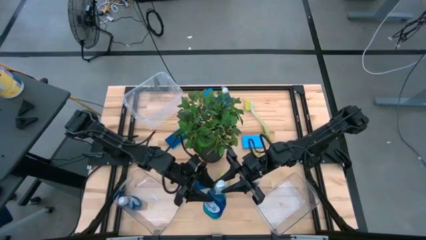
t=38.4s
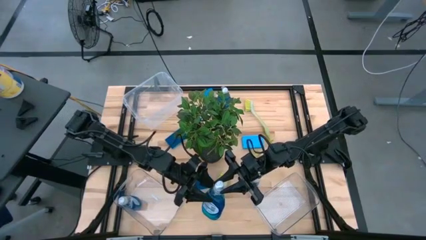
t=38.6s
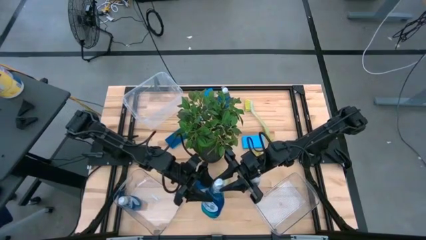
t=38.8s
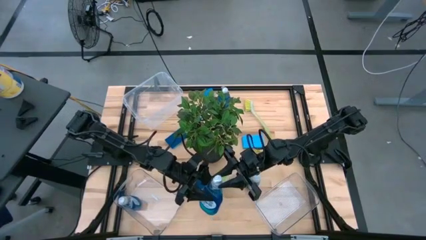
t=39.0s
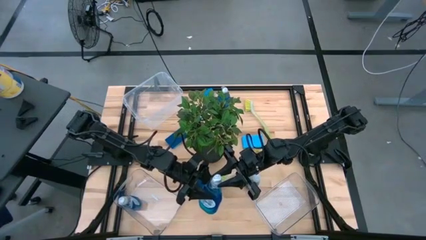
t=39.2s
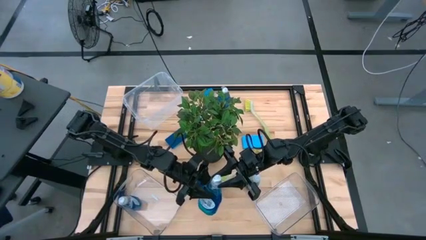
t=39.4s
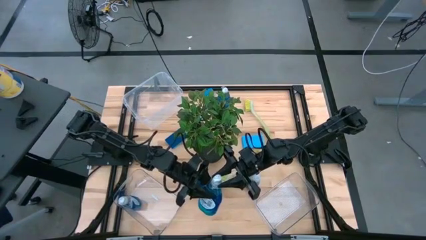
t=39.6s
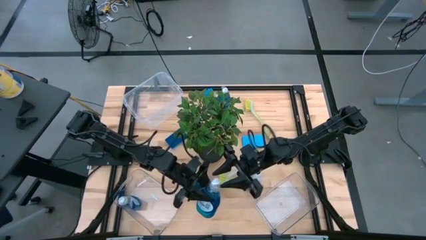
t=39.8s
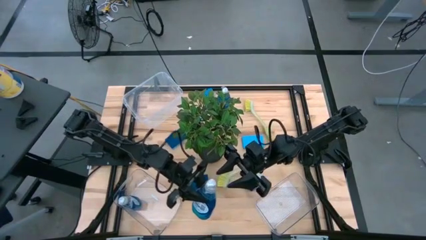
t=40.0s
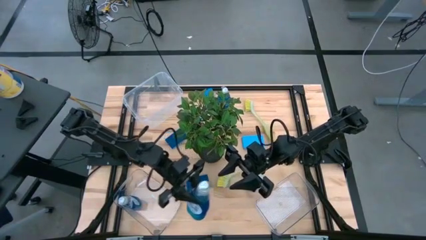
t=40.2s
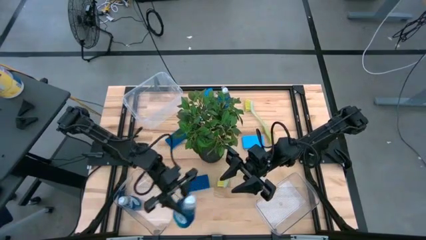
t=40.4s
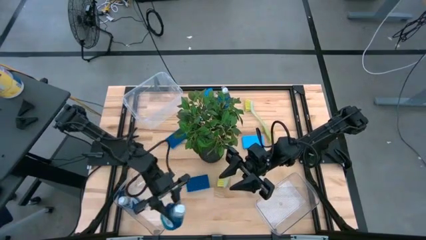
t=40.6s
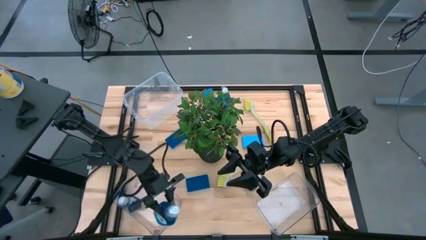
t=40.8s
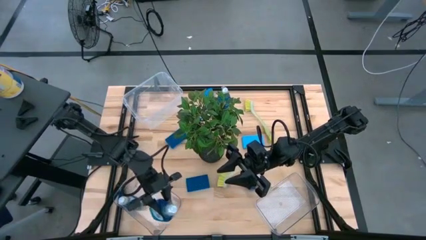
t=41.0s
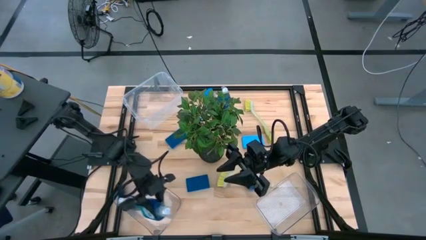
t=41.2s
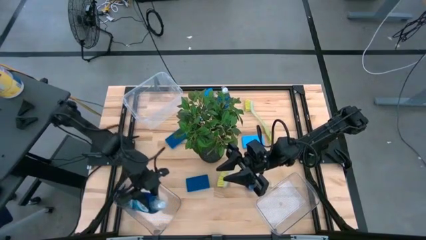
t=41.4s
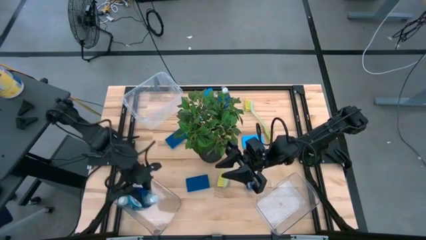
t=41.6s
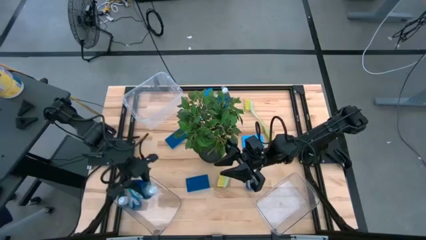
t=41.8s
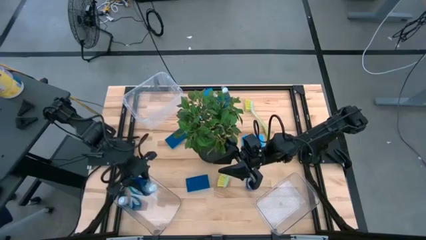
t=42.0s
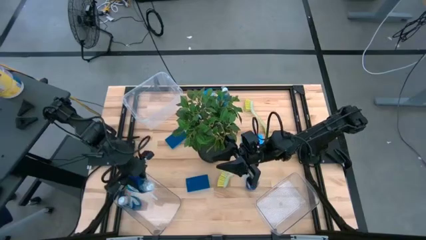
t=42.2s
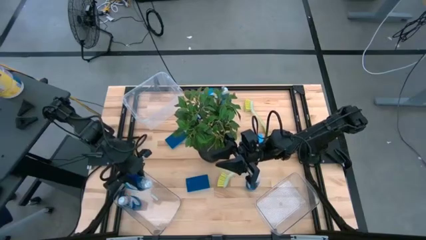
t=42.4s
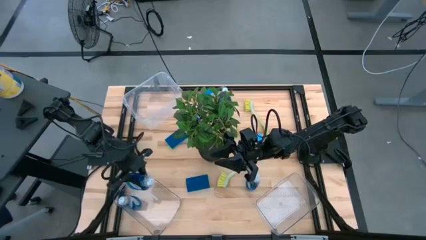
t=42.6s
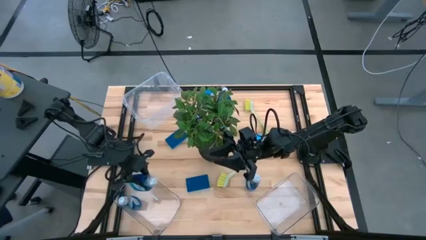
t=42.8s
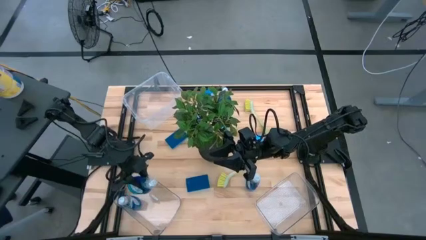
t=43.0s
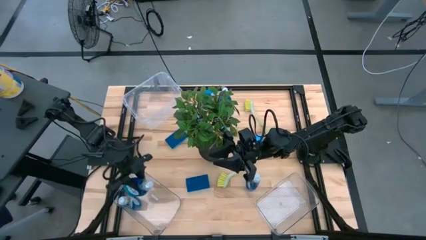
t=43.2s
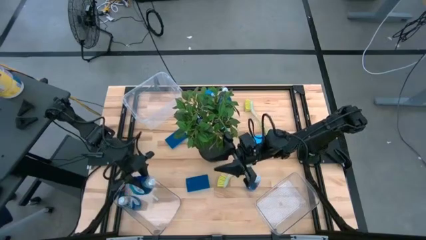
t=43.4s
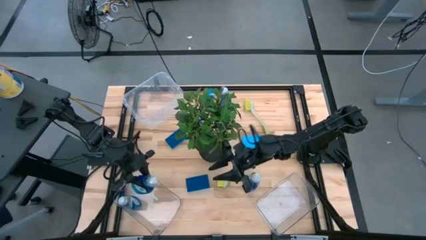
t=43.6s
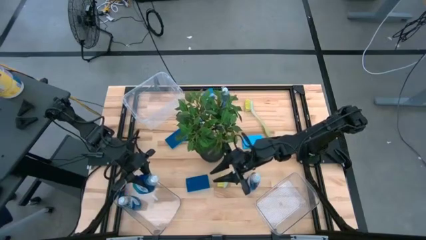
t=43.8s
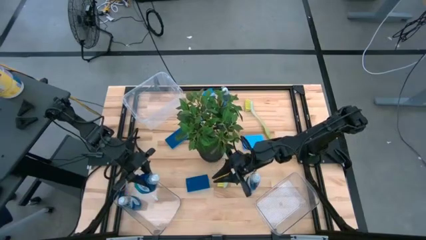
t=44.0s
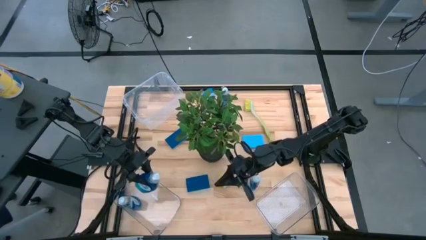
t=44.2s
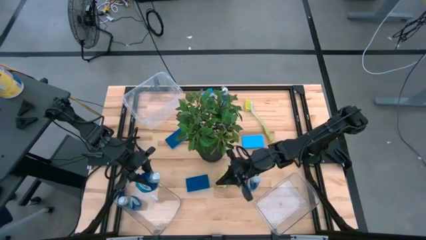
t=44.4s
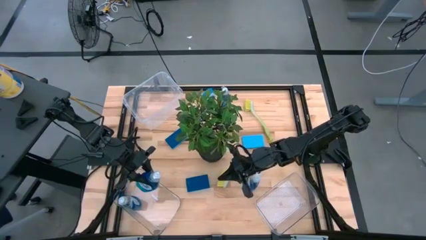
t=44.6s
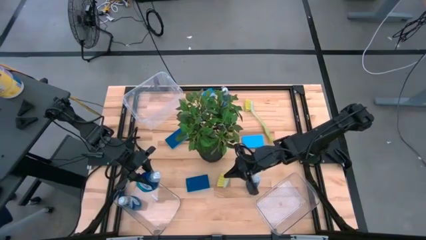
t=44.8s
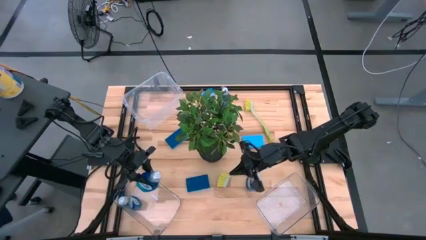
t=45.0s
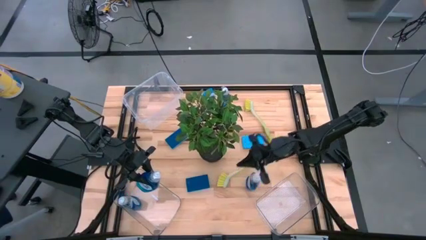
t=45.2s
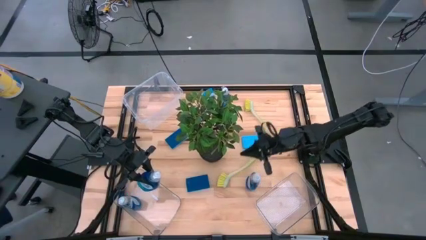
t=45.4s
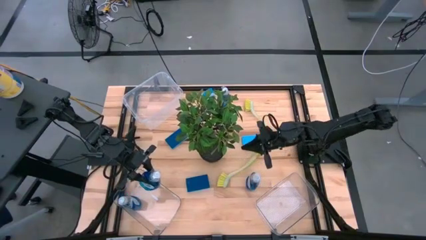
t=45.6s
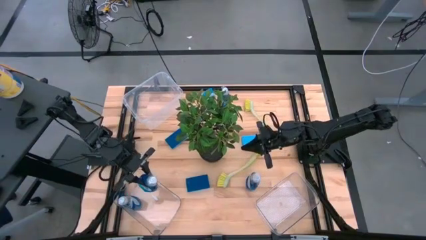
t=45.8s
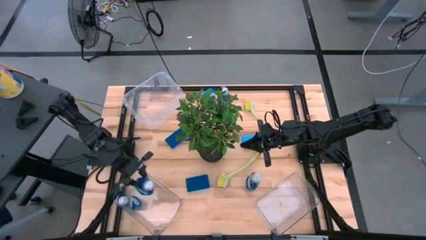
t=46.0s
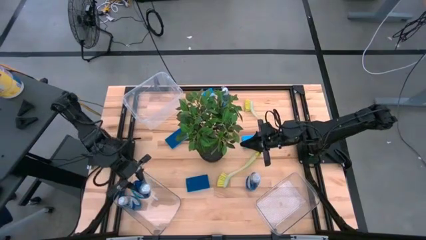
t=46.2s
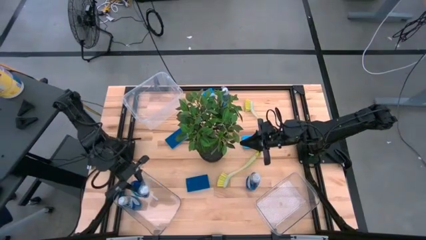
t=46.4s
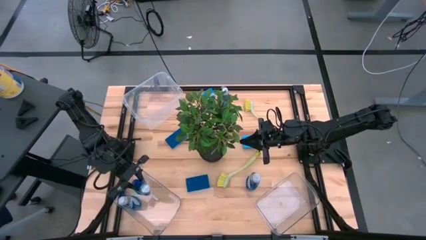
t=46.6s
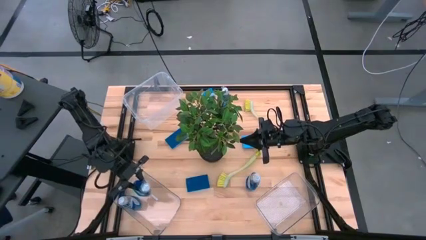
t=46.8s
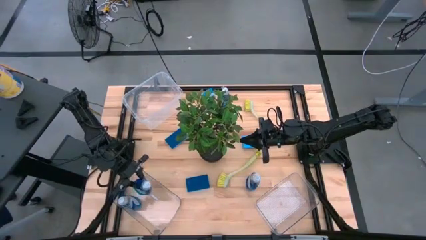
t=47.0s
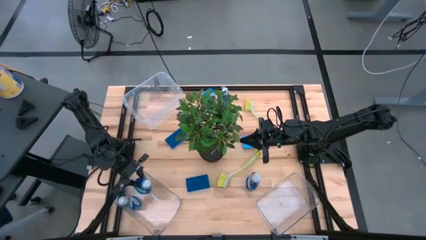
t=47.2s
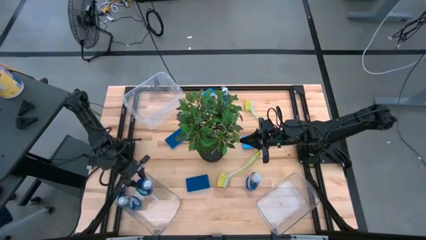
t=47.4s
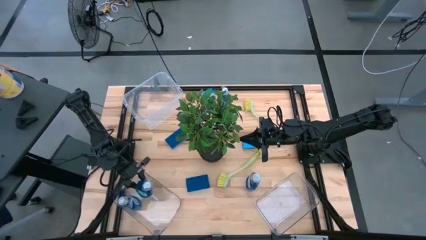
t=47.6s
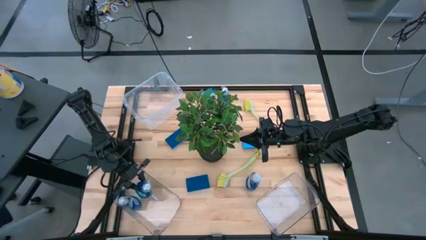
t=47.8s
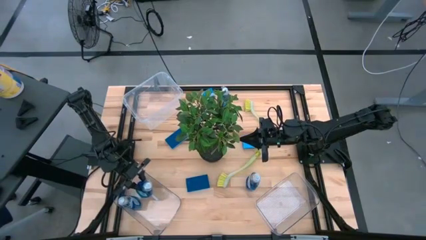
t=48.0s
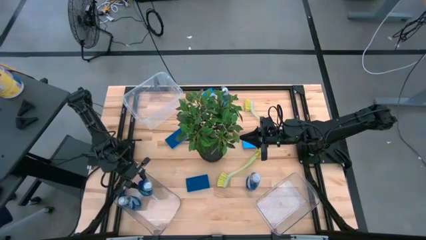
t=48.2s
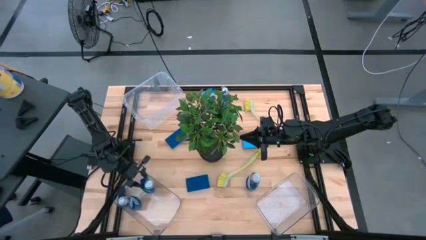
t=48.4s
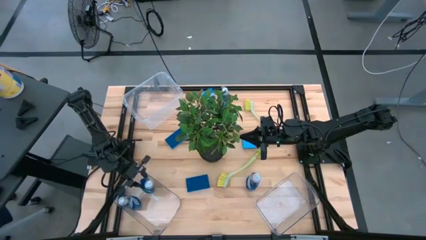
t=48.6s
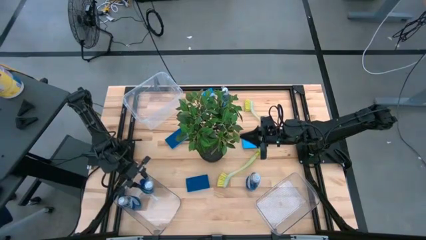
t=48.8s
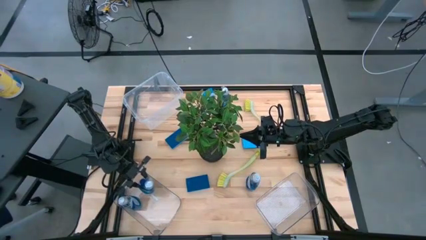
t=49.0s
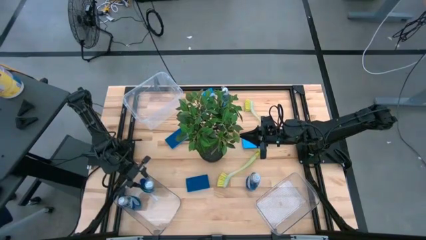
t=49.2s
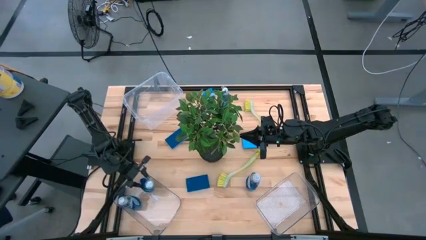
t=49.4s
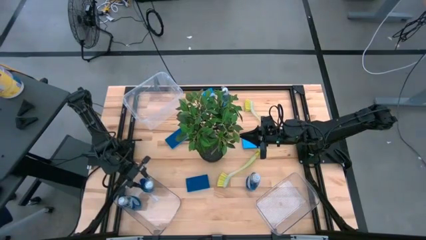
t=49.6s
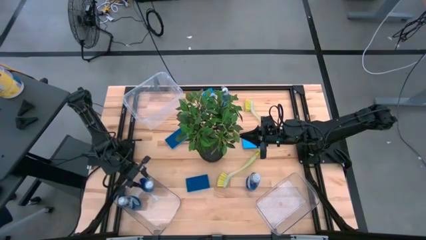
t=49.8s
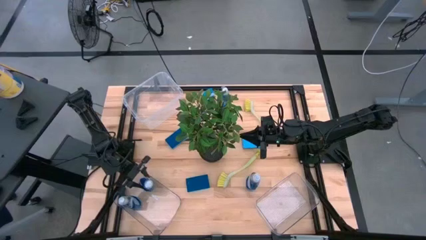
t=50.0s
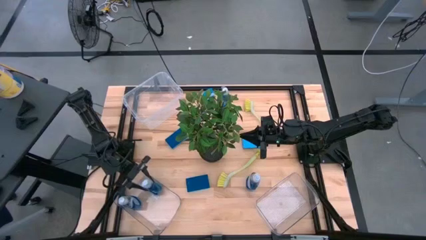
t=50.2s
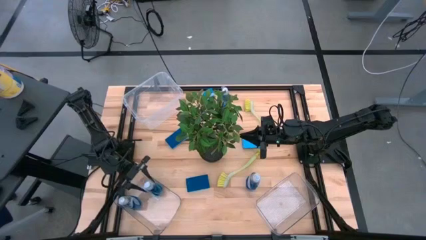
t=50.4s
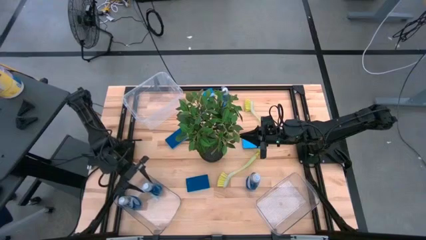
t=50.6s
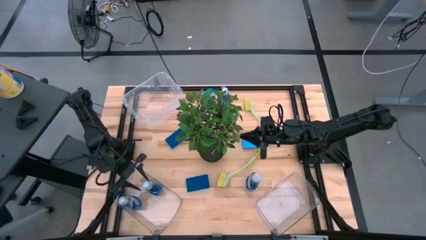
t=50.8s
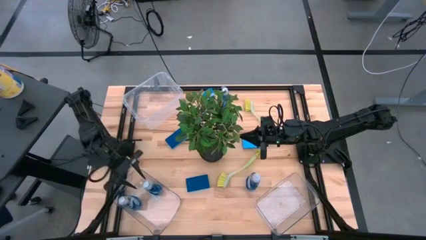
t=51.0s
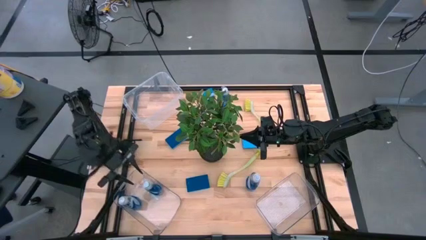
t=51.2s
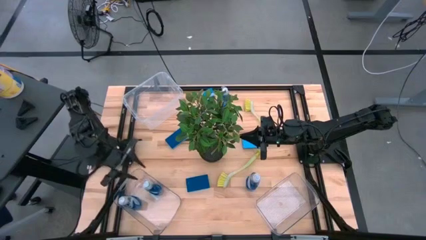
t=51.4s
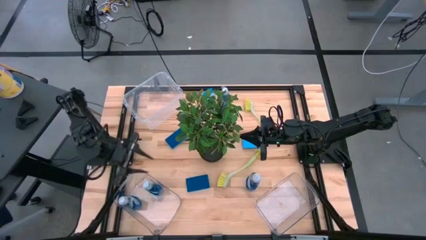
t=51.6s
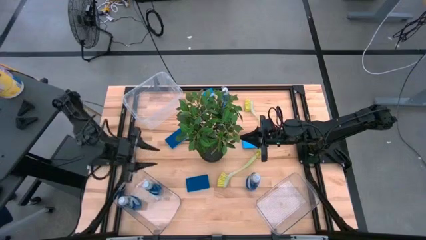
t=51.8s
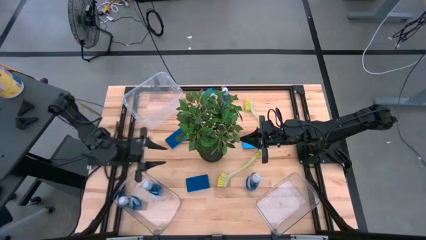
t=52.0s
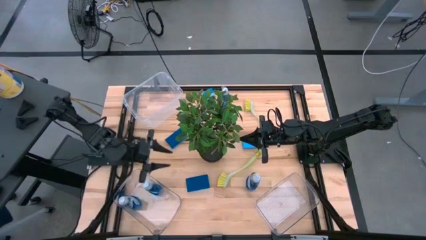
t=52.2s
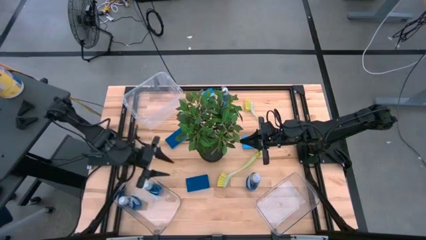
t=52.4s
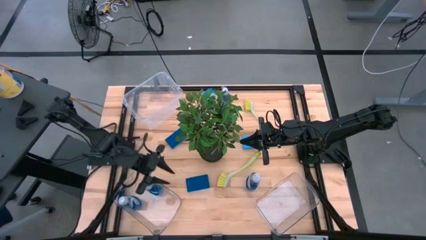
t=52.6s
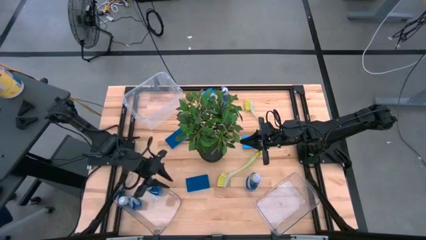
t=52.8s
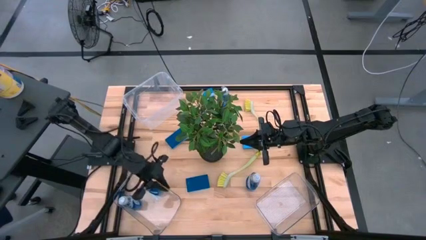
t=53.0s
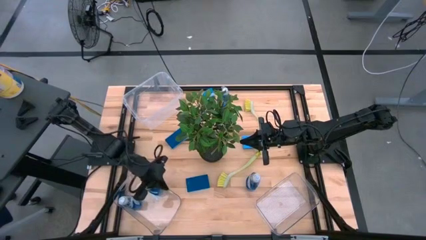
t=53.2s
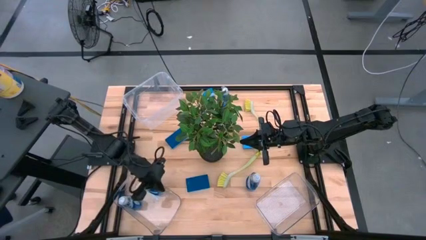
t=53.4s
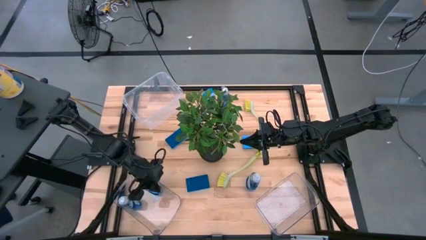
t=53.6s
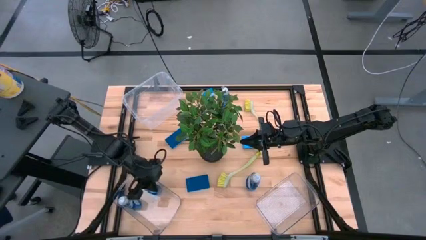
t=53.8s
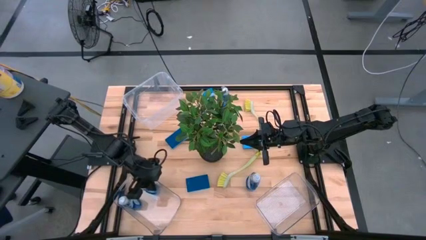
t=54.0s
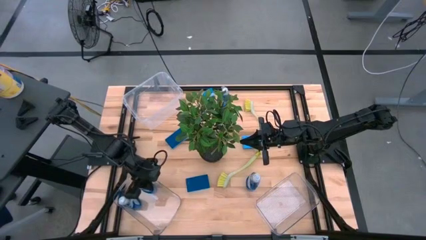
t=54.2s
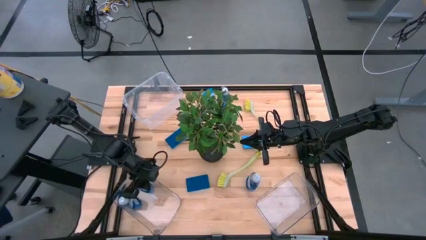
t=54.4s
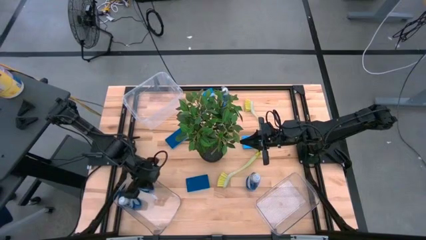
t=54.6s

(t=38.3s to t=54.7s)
Task: Pick & Place Kitchen Sink Supplies
Put the blue liquid soap bottle into the bottom left transparent bin
